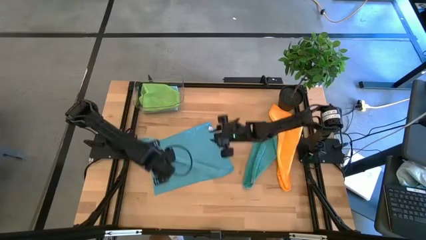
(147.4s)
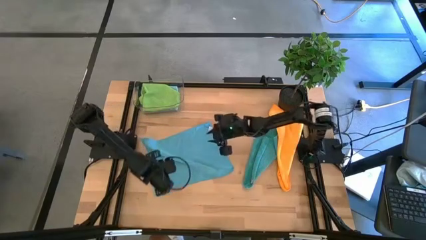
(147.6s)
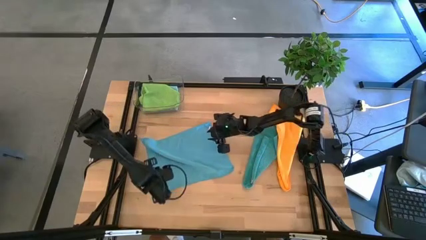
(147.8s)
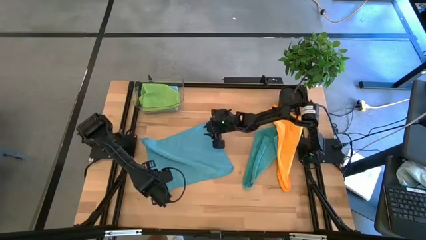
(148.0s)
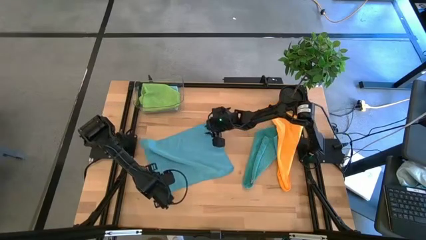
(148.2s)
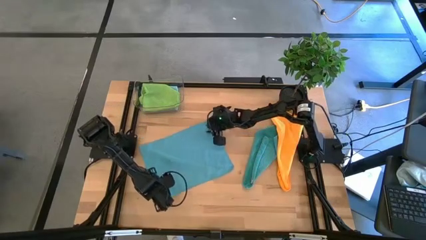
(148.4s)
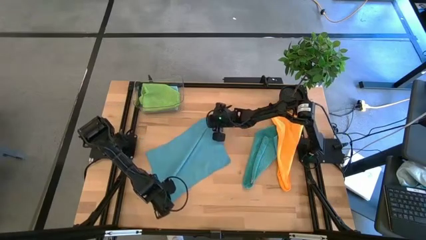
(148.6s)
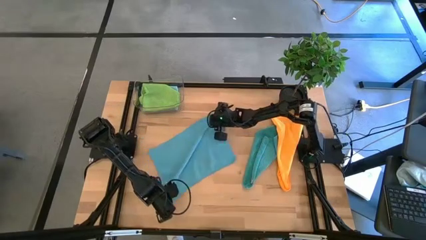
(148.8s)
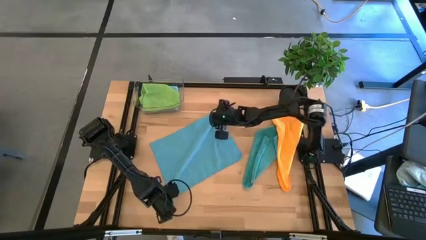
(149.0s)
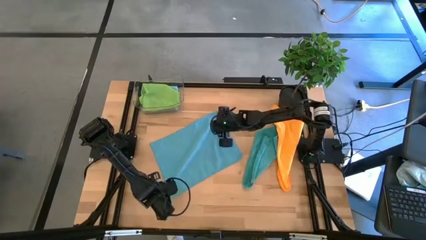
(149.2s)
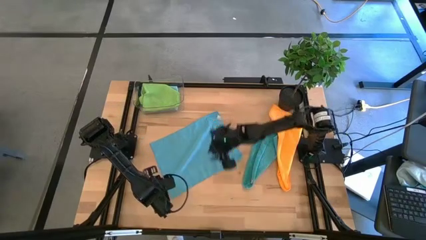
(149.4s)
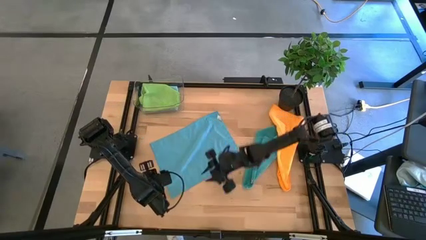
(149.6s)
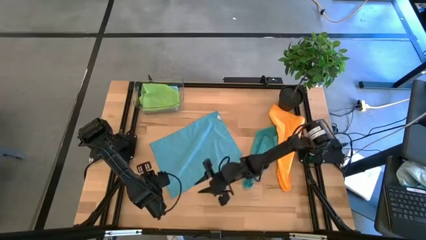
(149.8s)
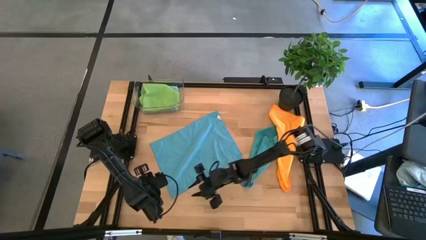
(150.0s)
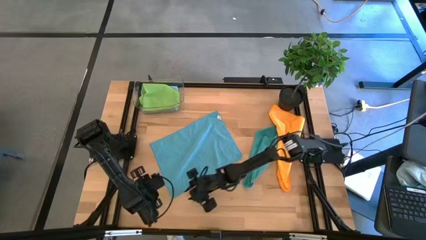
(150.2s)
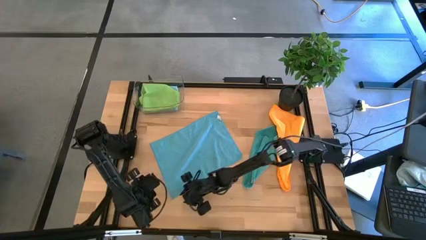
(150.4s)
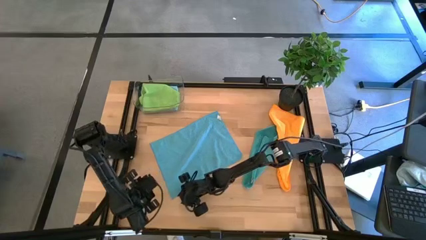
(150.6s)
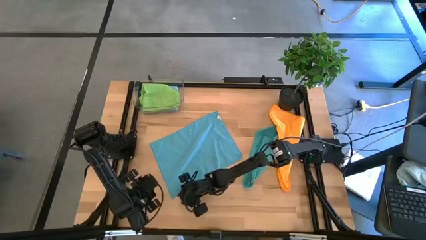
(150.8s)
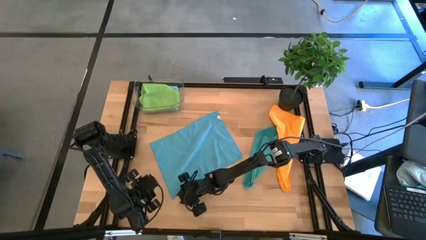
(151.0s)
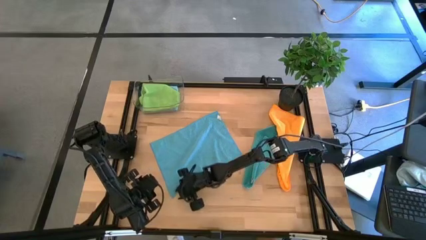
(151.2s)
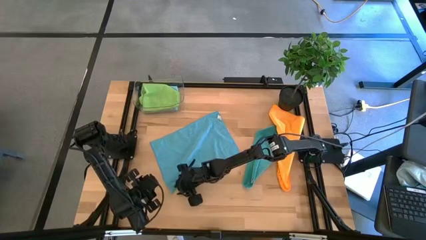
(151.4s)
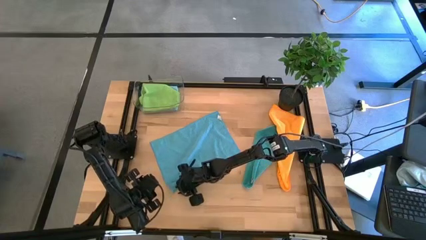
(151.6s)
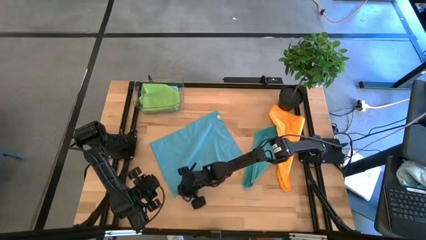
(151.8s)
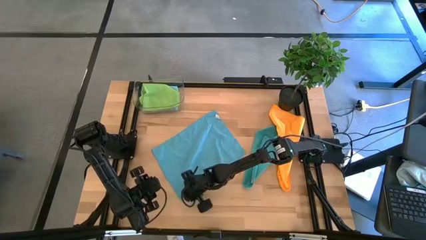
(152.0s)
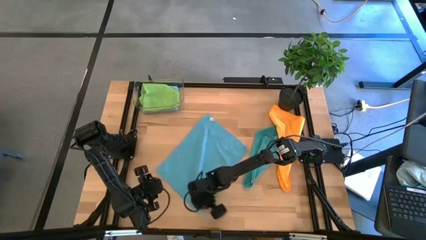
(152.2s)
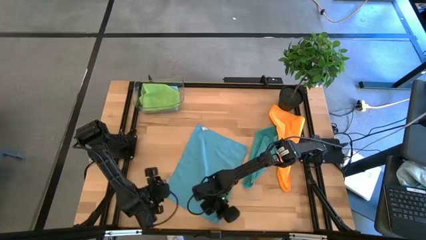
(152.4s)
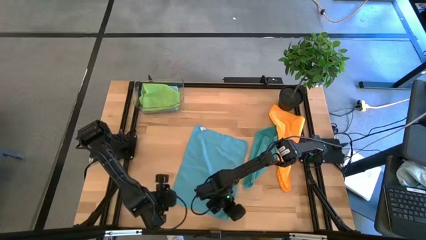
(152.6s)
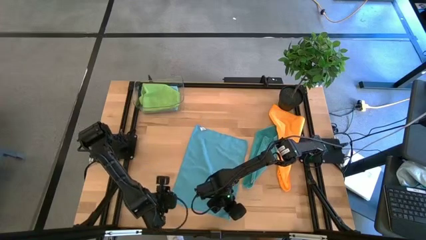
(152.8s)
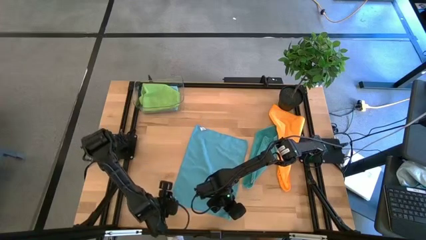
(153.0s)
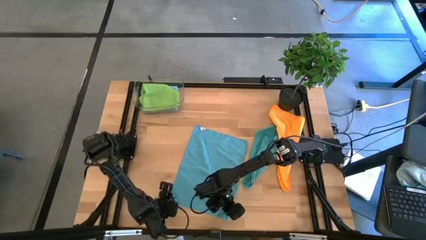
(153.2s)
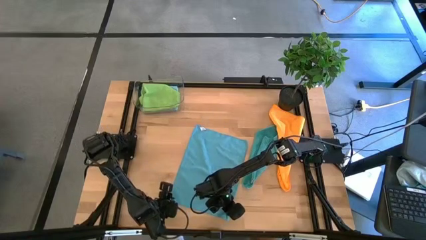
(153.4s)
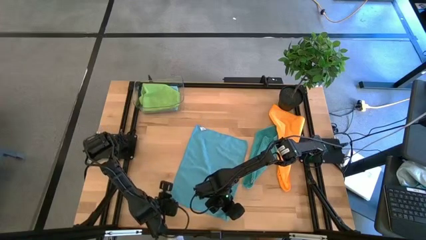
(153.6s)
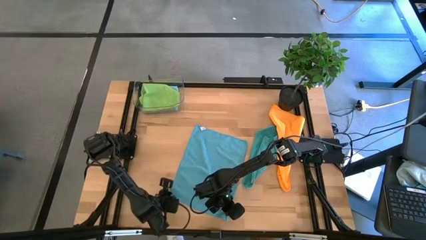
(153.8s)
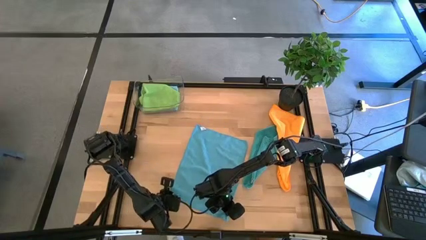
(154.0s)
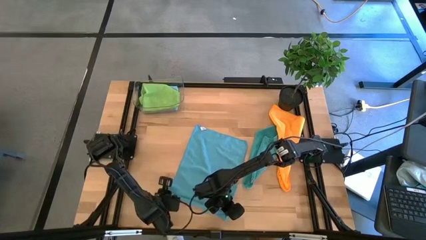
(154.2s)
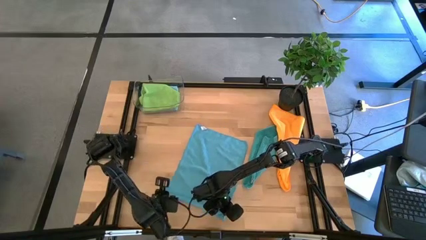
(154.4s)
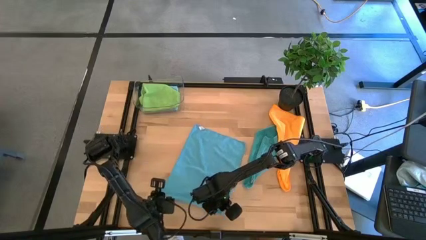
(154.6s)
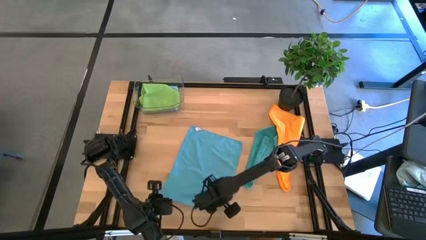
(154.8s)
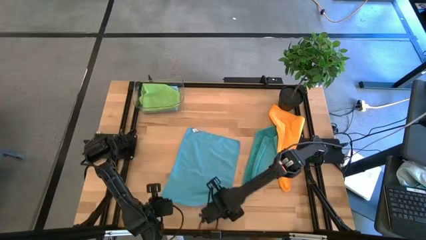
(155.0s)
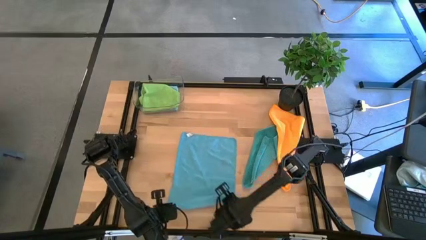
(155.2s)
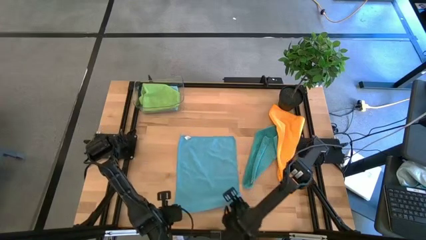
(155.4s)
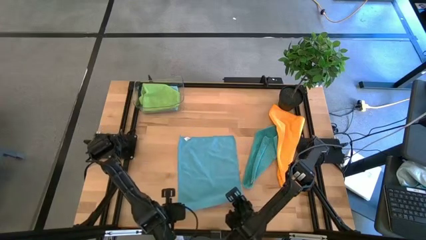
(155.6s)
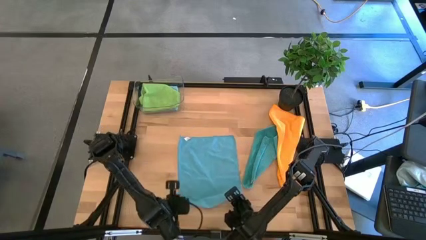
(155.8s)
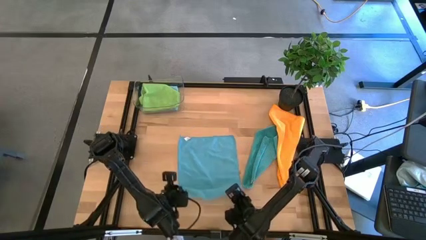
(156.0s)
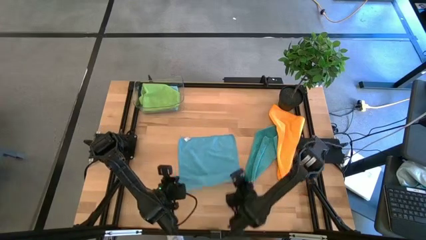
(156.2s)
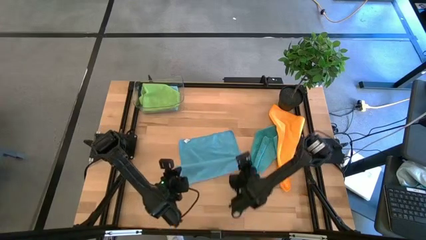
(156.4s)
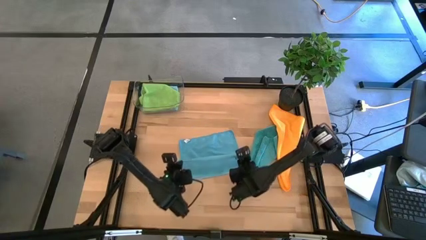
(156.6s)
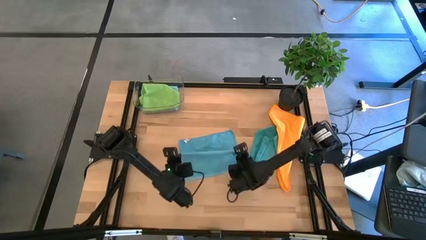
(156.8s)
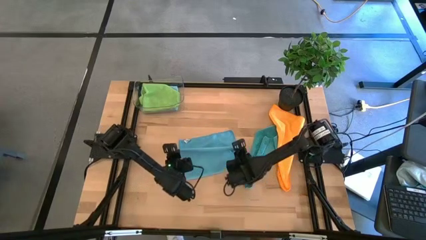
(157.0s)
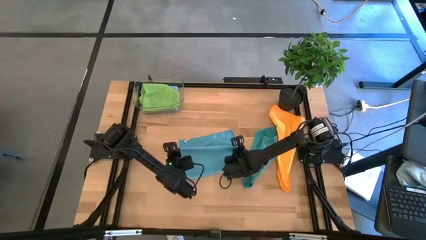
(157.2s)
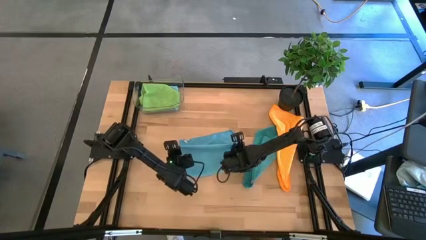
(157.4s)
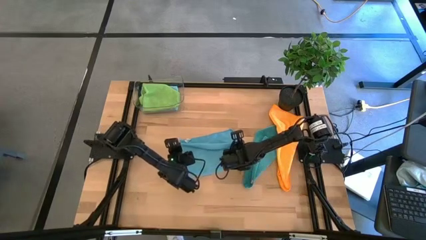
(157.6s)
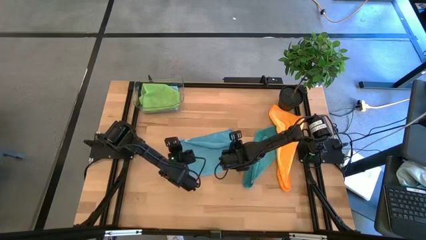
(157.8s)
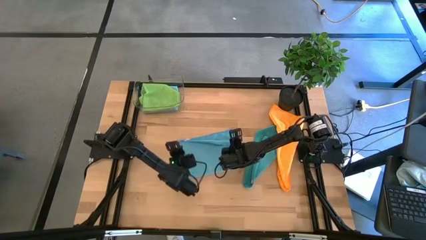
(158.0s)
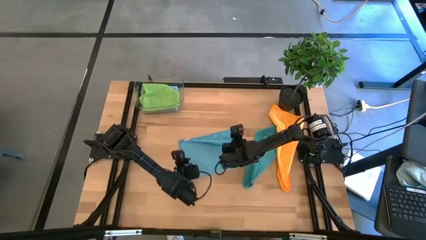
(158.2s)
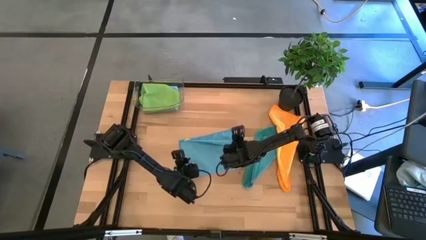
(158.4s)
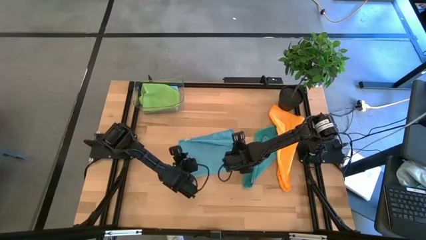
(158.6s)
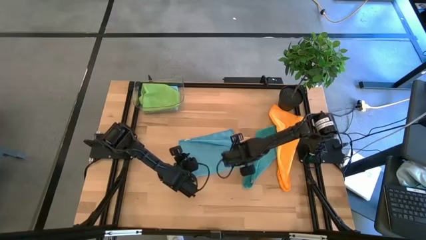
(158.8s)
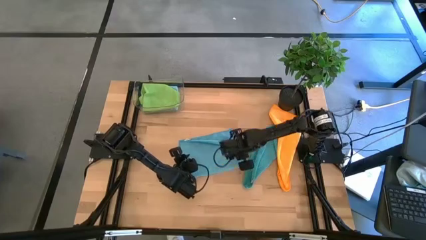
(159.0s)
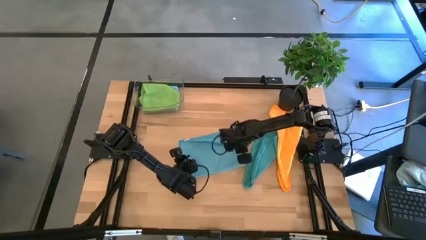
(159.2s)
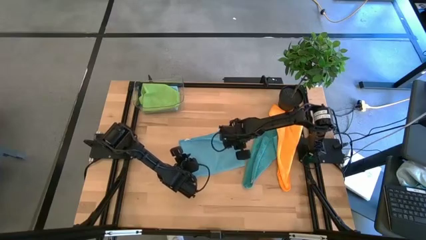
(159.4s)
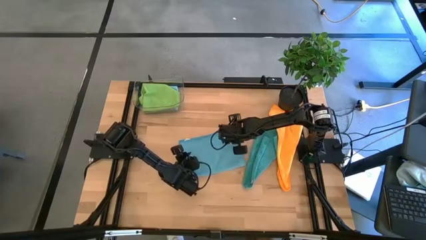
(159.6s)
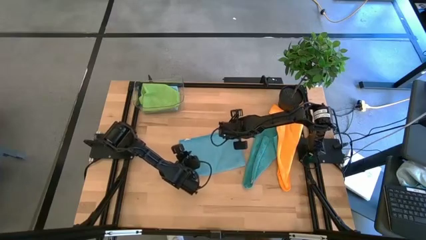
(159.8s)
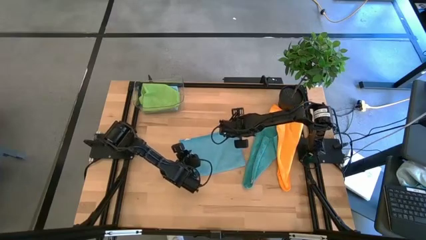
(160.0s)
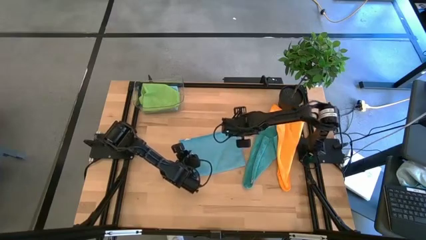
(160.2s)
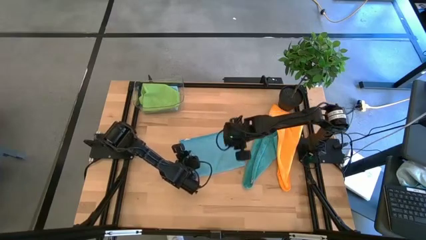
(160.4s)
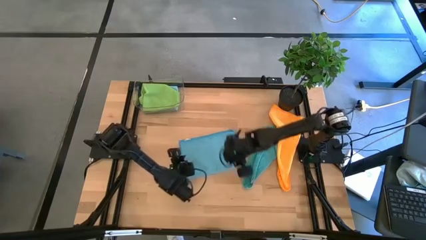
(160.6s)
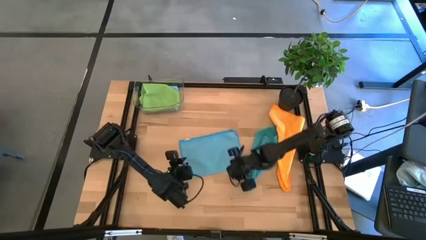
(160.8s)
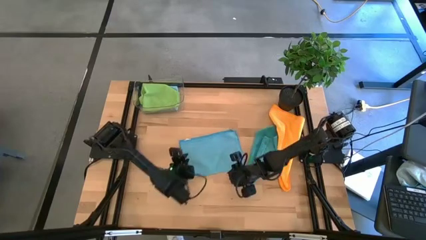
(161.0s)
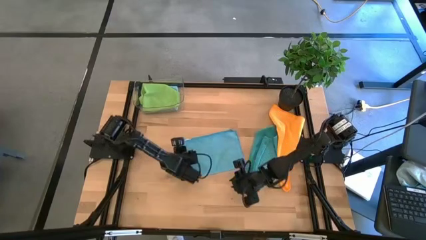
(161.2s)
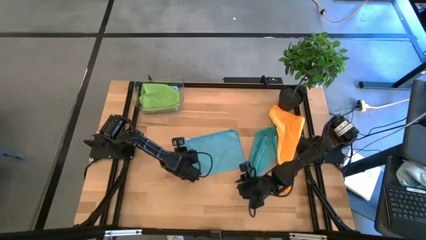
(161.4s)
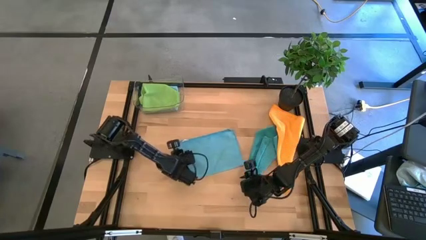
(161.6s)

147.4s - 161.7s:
Task: Fold microfiber towels
Fold the light blue microfiber cloth

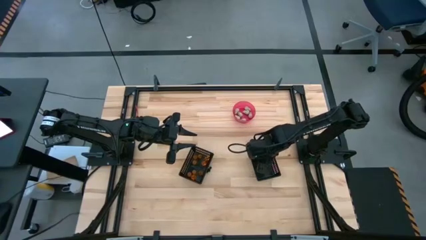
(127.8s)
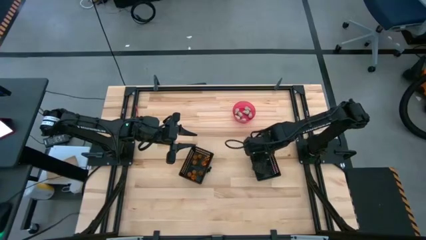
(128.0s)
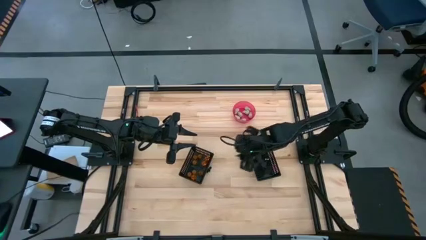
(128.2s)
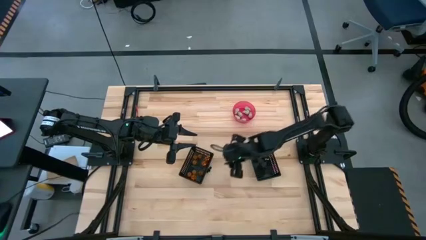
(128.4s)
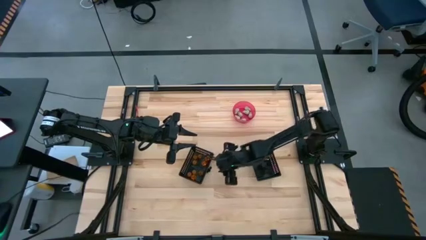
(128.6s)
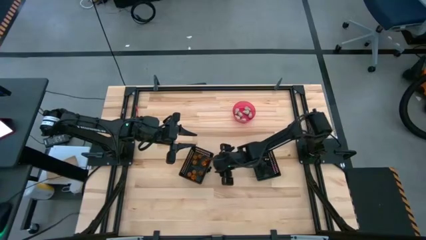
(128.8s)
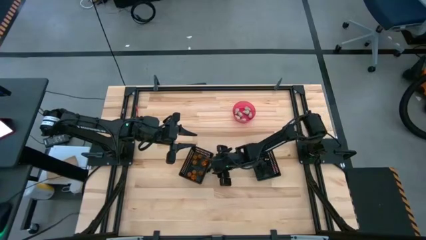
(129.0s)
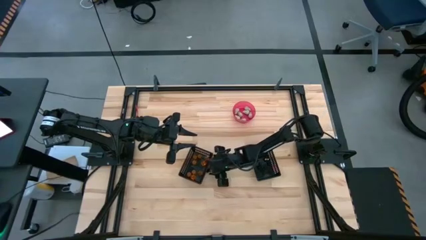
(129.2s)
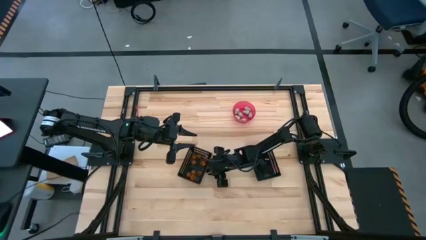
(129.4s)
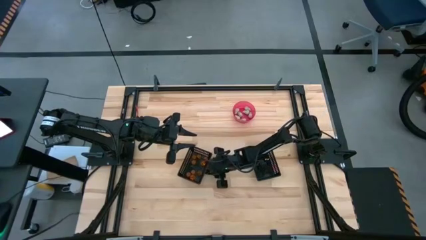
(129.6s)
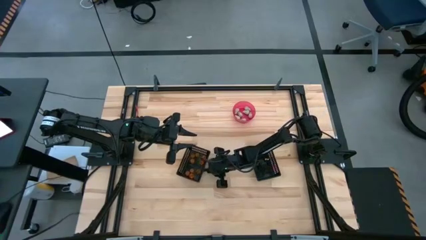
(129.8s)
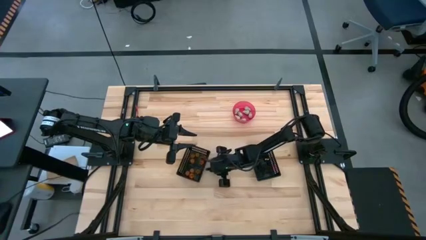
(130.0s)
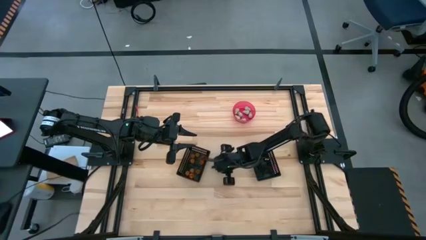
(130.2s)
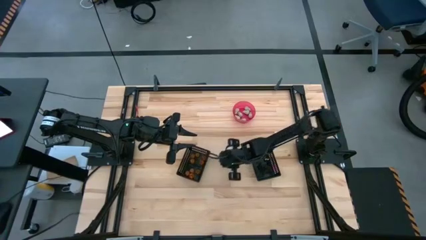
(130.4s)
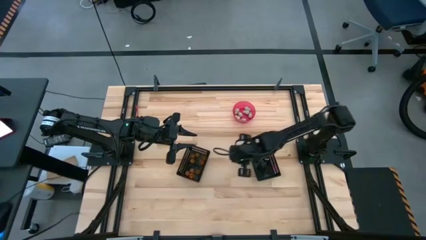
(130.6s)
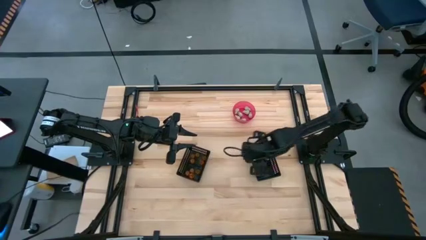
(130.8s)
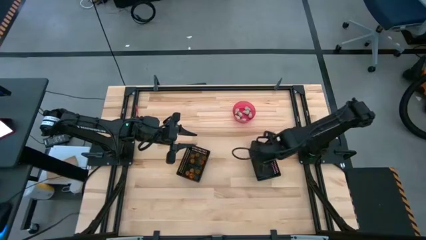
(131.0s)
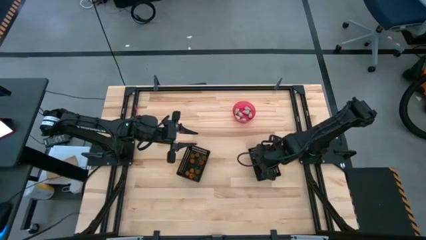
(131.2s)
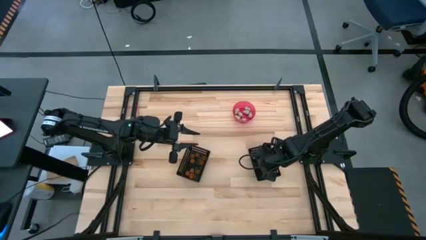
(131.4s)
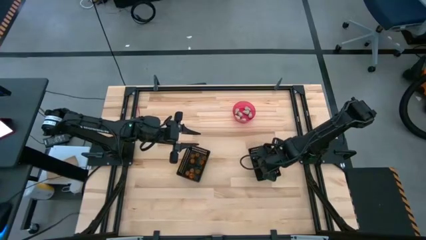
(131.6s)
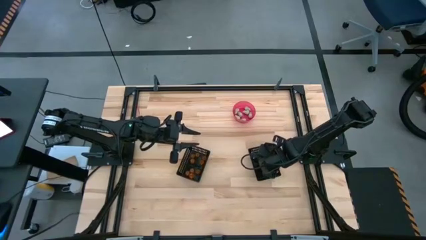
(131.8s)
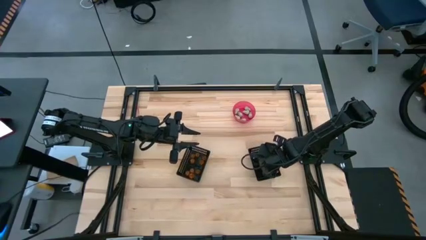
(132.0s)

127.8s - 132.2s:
Task: Sort Halloween decoration
Put the black skeleton toy into the right black bin
